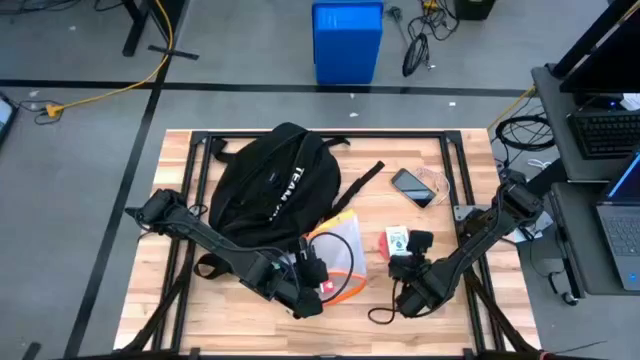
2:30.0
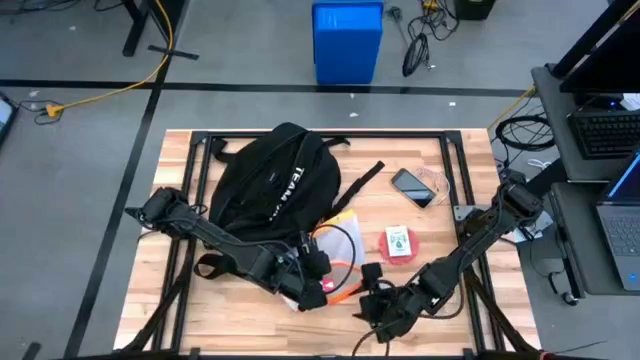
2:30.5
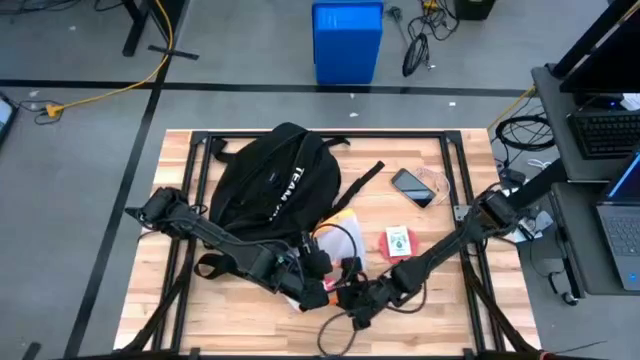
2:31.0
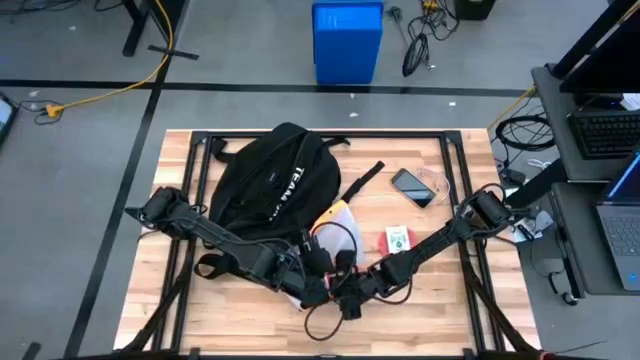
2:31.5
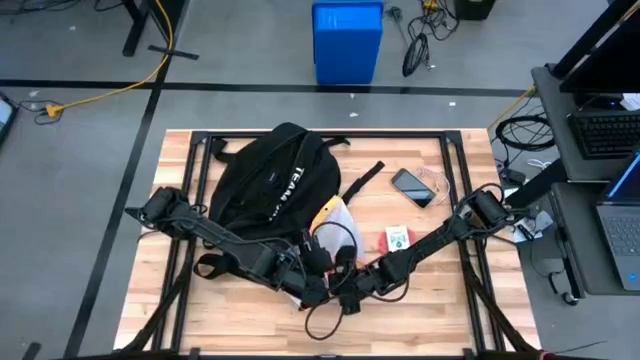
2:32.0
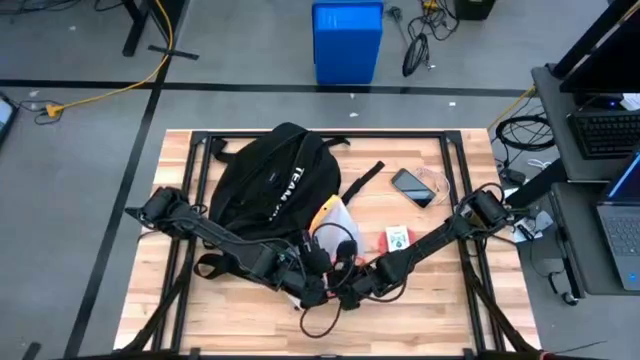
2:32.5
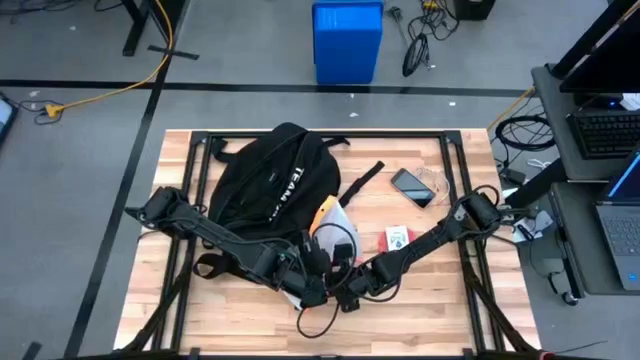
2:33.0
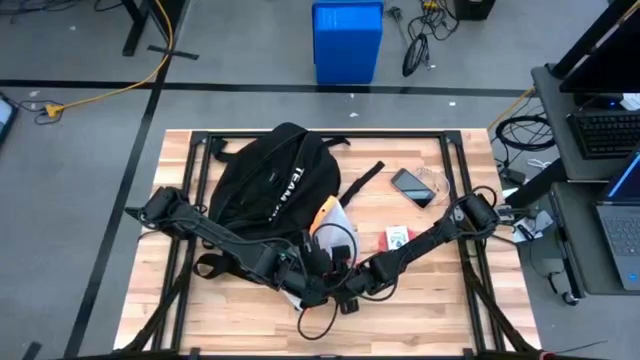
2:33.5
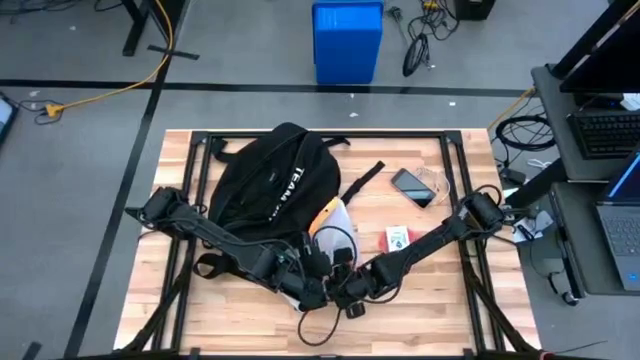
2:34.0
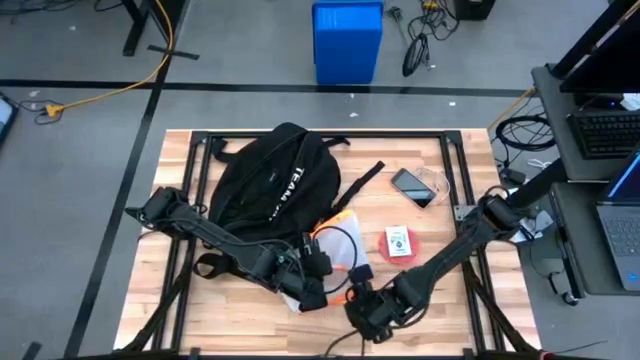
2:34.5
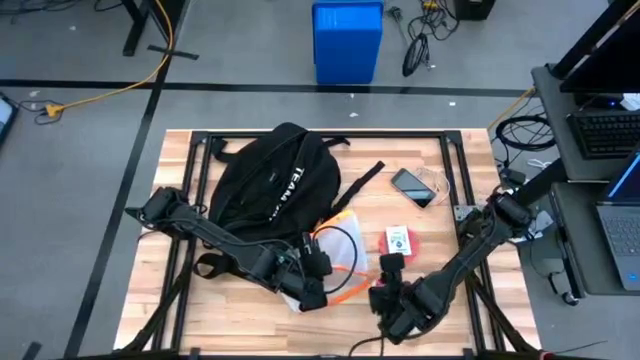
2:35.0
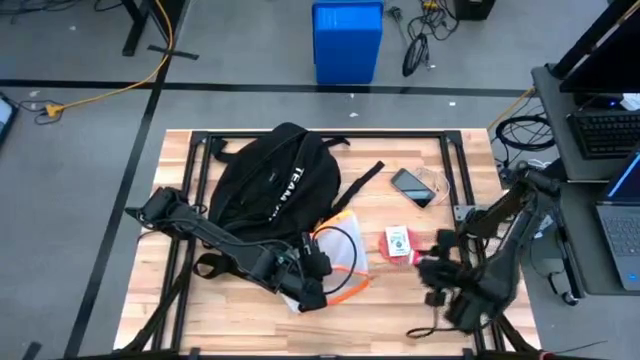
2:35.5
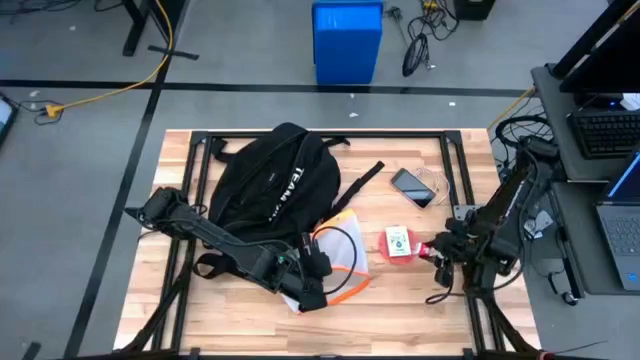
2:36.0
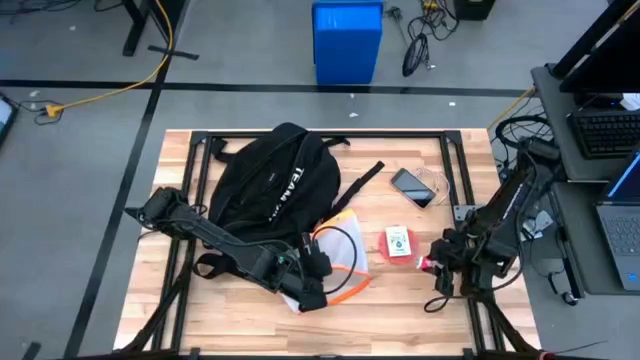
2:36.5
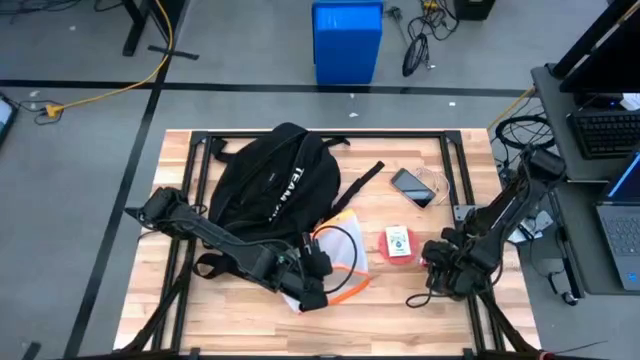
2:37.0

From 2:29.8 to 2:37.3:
Task: Unpack backpack
Remove the charger adapter from the orange zip bag

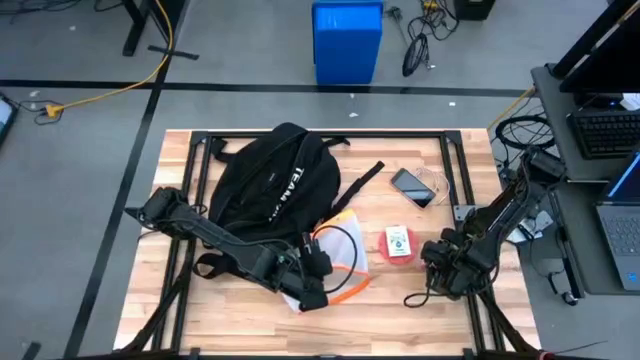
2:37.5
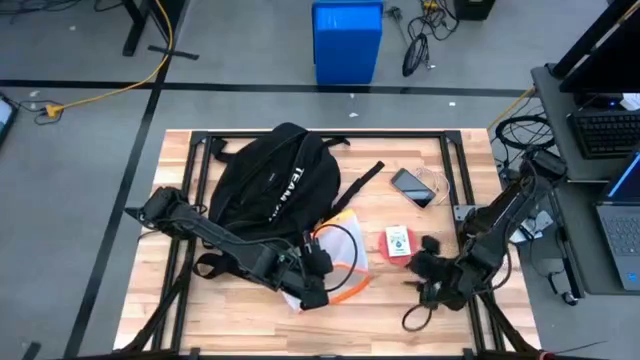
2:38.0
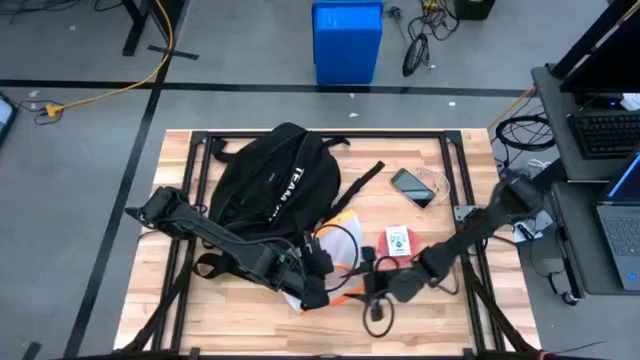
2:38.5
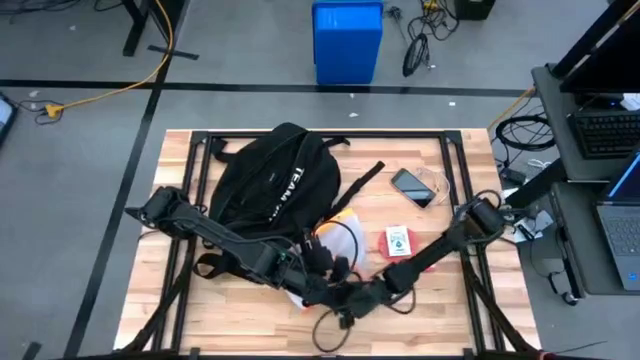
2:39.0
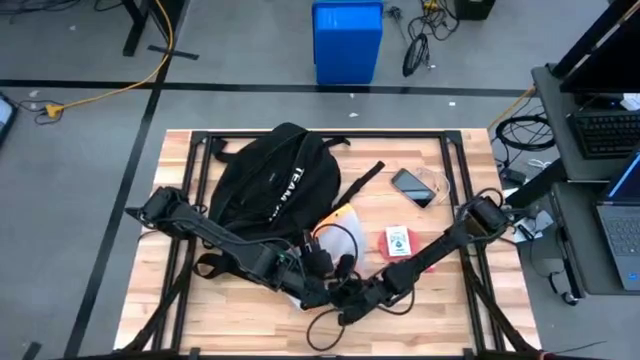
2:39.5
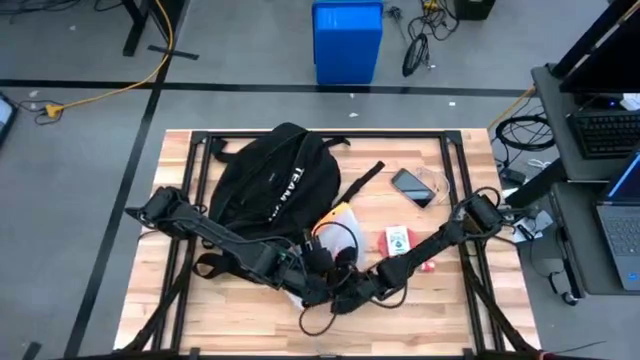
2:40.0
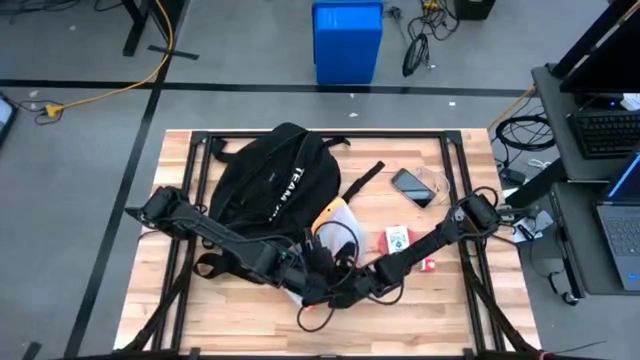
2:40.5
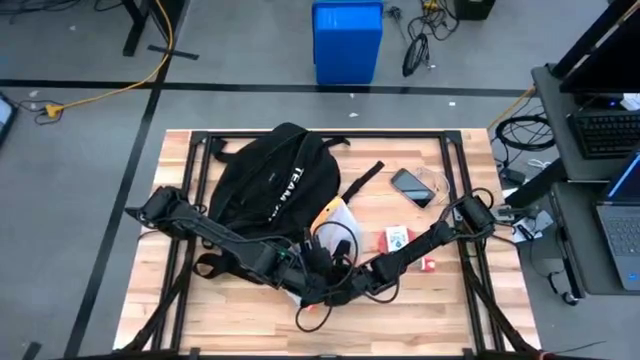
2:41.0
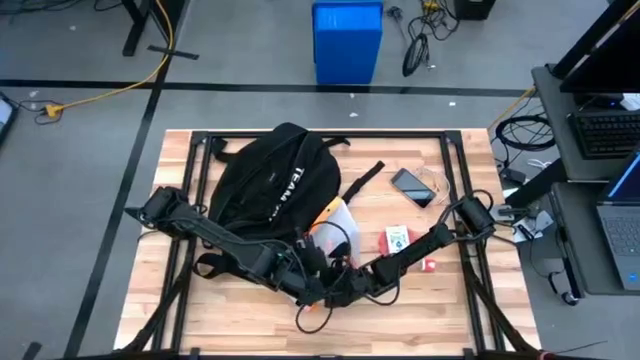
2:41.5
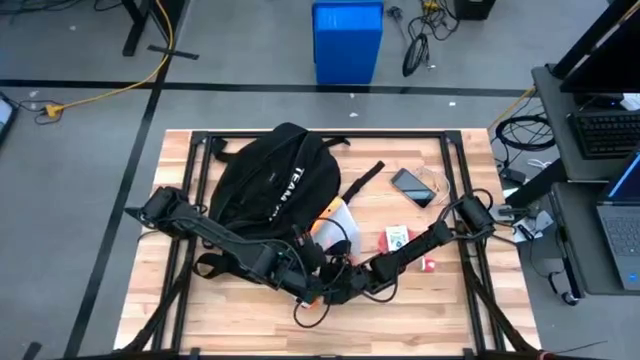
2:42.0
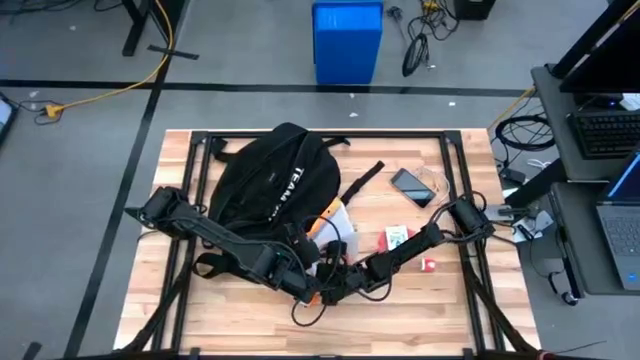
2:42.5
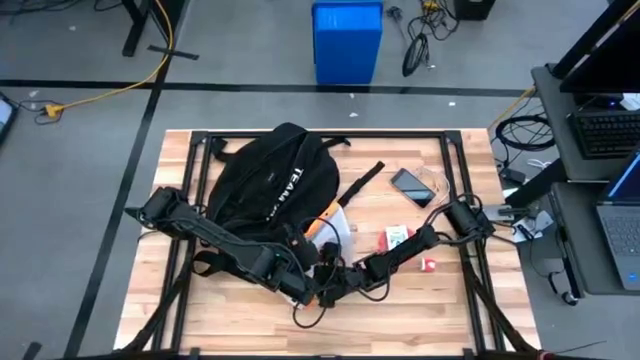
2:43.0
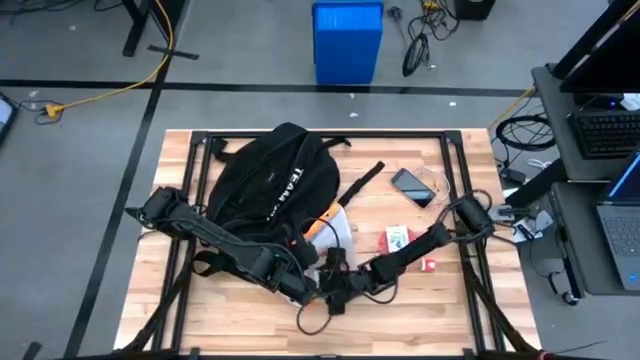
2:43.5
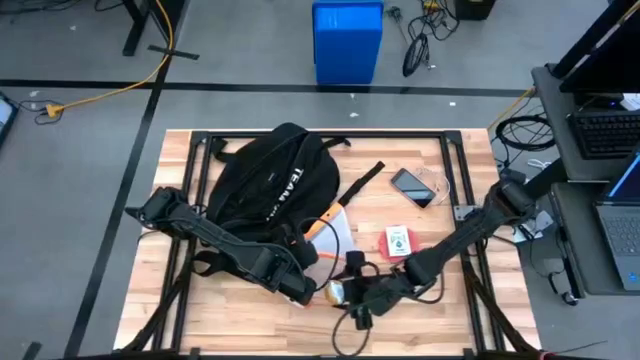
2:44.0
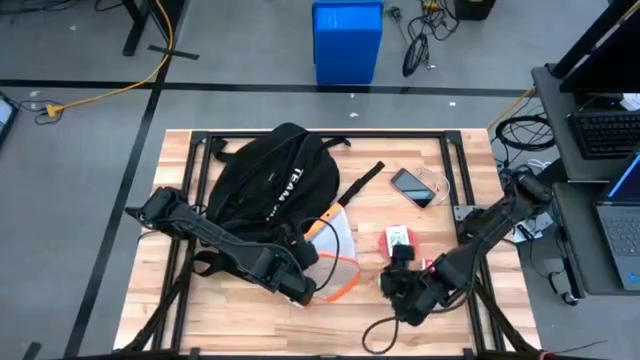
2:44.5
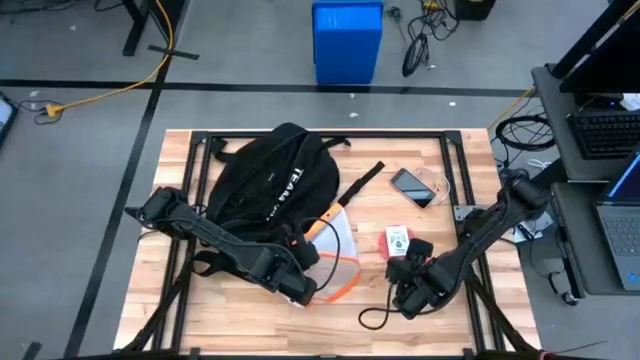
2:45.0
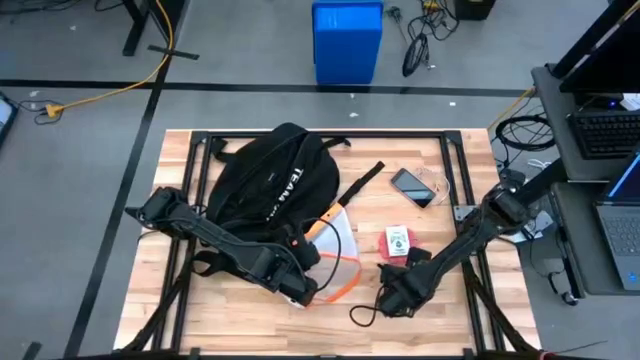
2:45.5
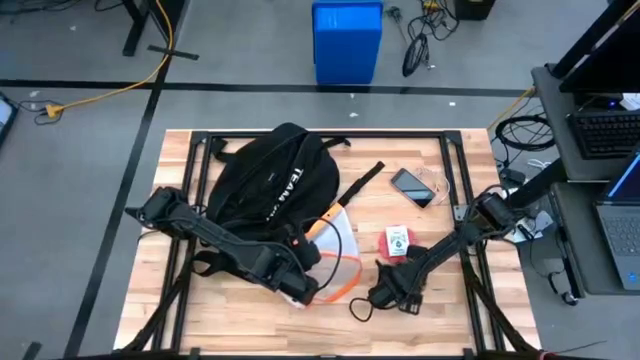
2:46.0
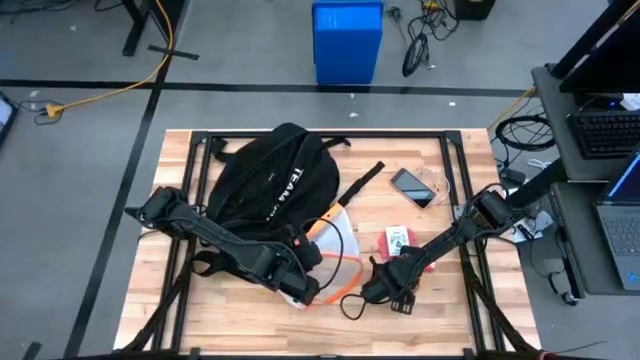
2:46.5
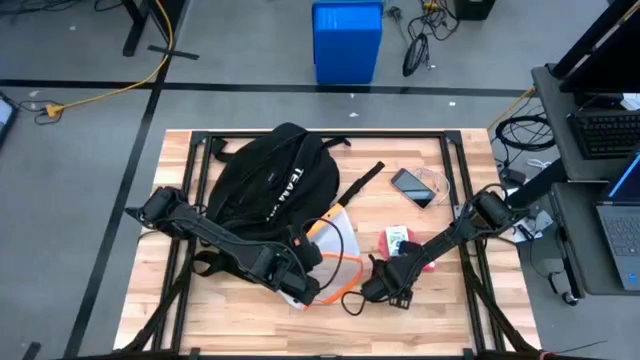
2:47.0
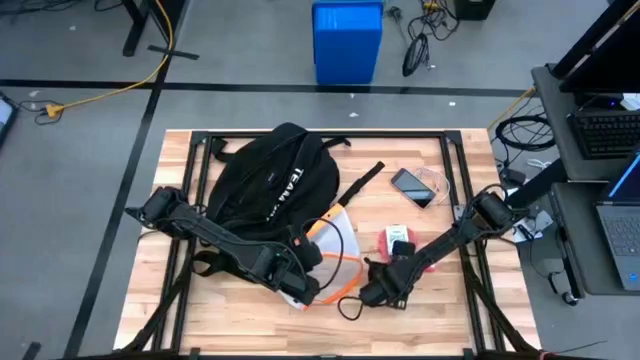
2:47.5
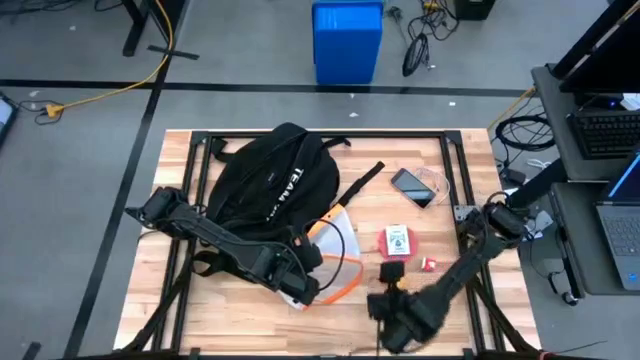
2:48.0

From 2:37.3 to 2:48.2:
Remove the scented candle from the orange zip bag

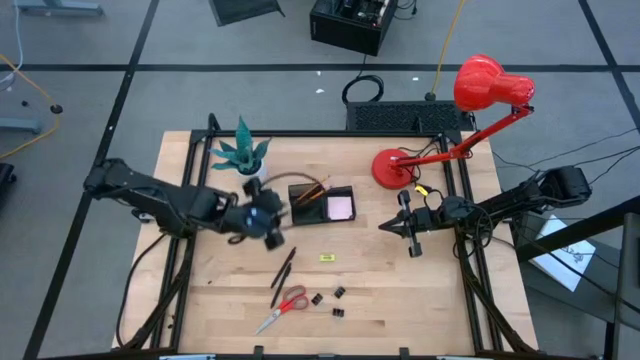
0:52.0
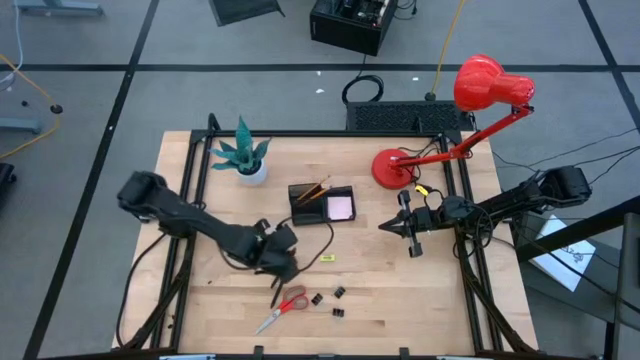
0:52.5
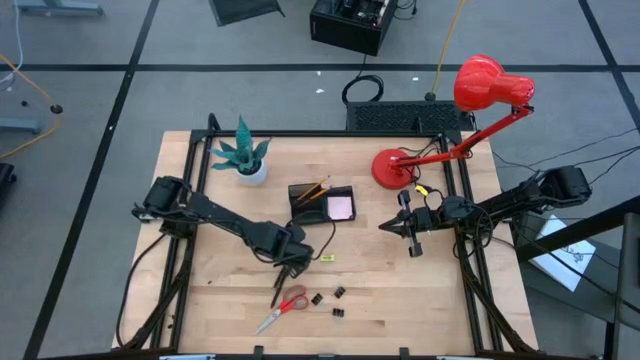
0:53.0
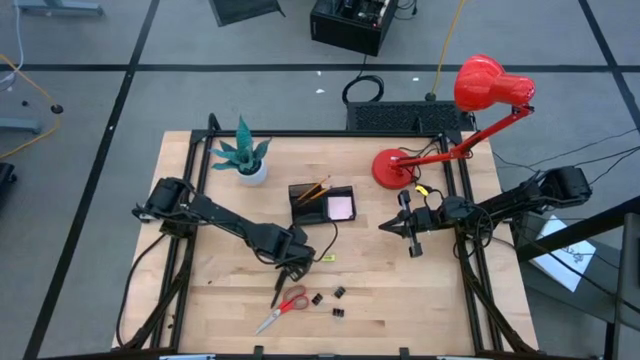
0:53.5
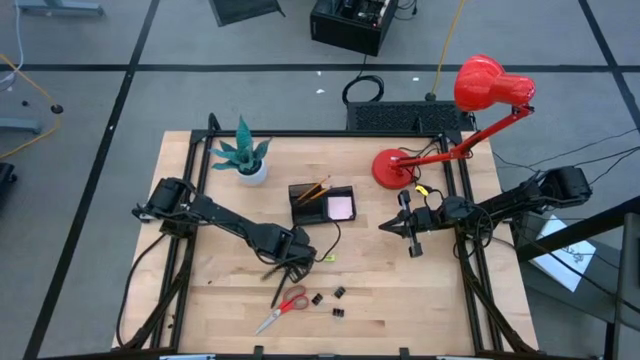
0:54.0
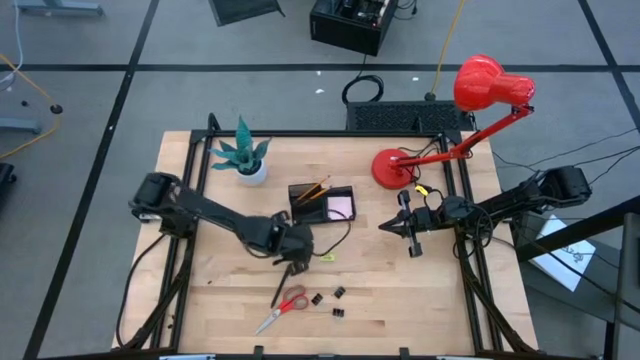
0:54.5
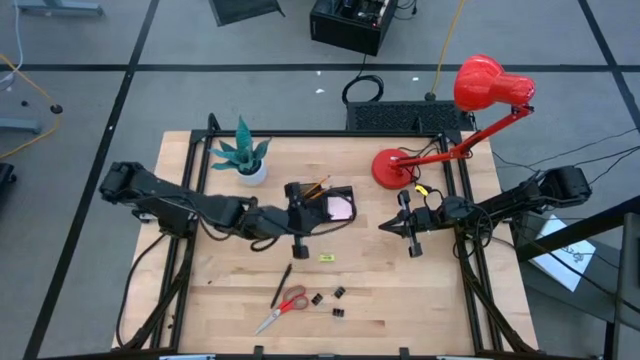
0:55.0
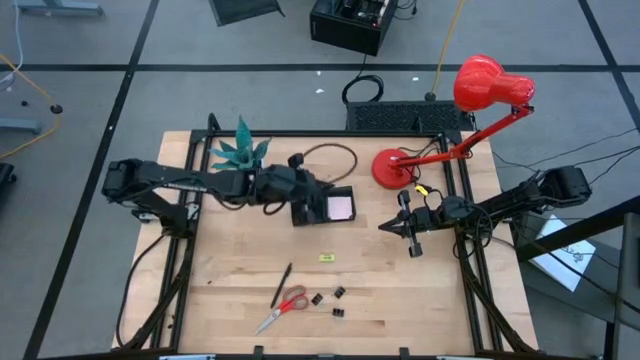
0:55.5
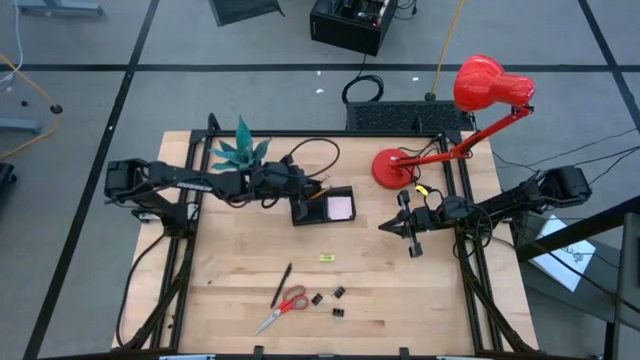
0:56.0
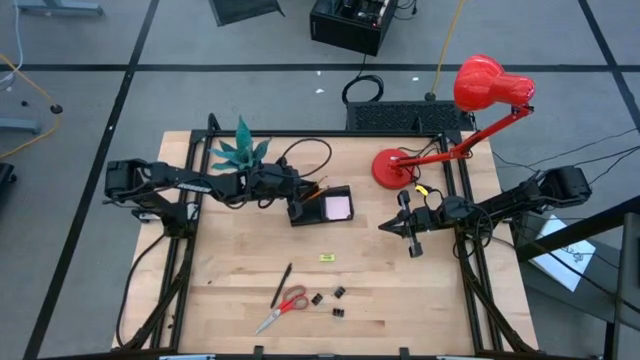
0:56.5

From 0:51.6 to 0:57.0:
Task: Pick and place office supplies into organizer
Put the black pen into the black desk organizer
